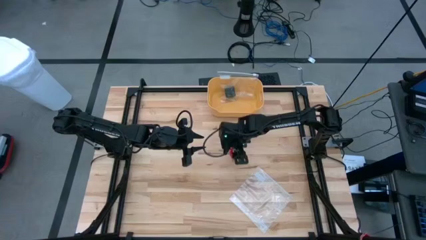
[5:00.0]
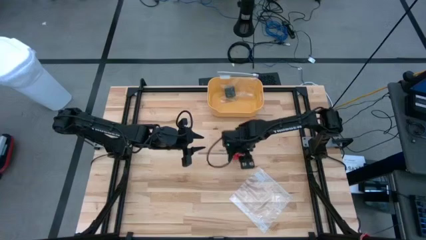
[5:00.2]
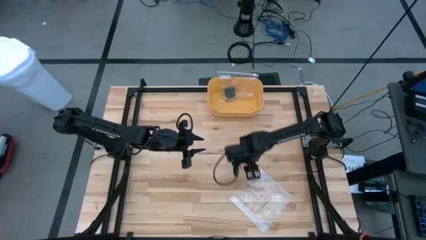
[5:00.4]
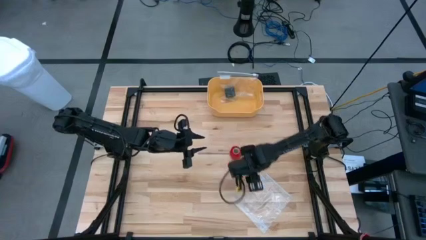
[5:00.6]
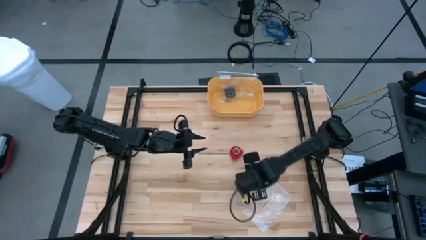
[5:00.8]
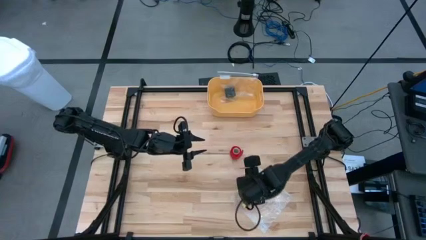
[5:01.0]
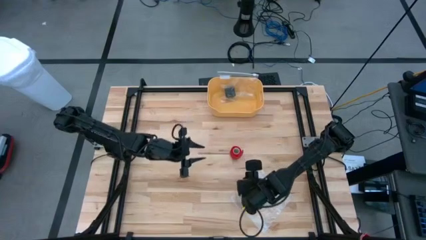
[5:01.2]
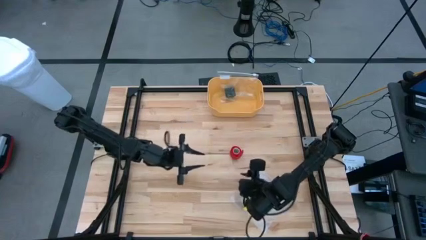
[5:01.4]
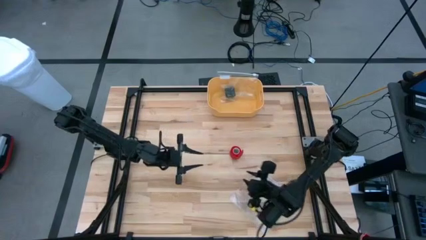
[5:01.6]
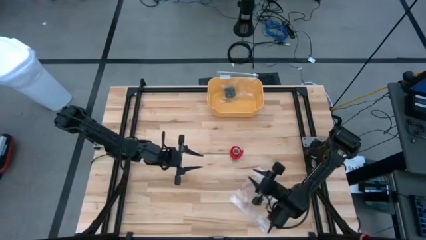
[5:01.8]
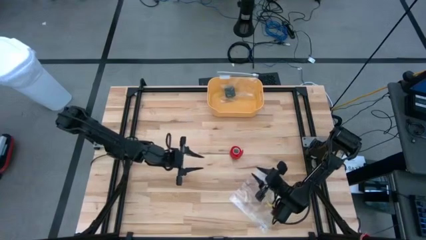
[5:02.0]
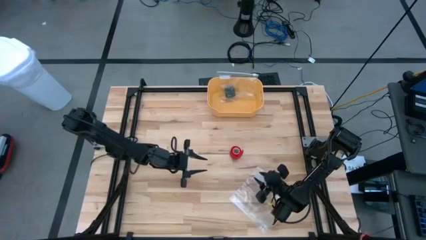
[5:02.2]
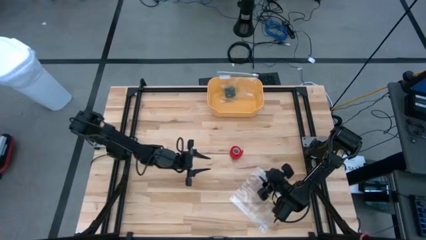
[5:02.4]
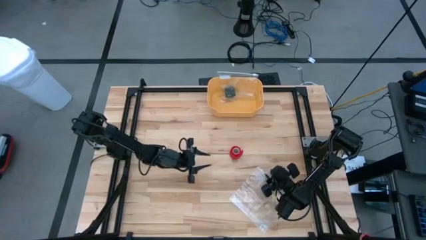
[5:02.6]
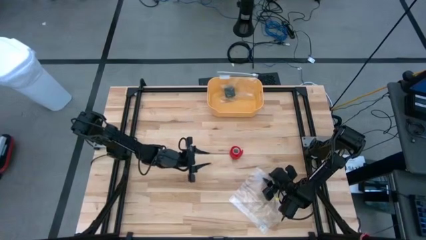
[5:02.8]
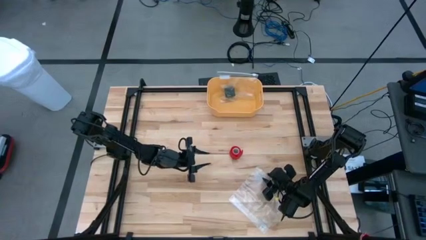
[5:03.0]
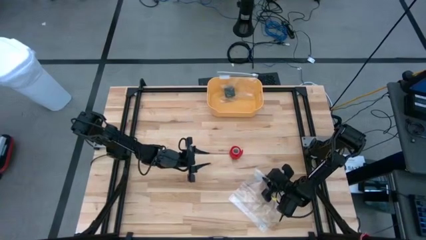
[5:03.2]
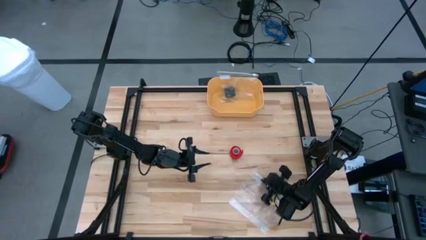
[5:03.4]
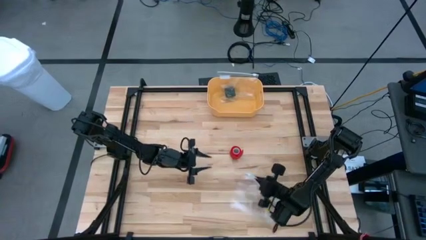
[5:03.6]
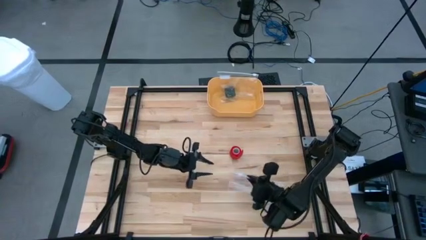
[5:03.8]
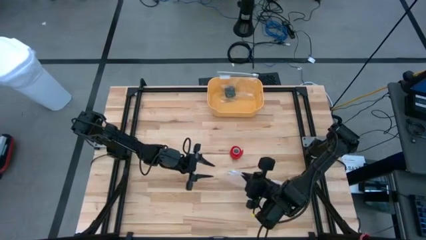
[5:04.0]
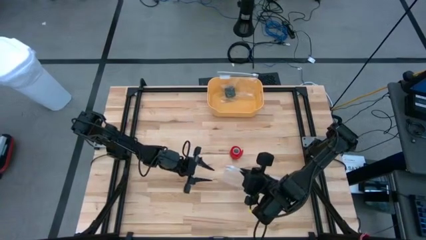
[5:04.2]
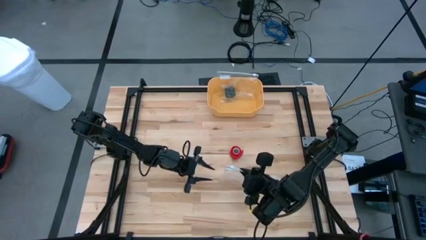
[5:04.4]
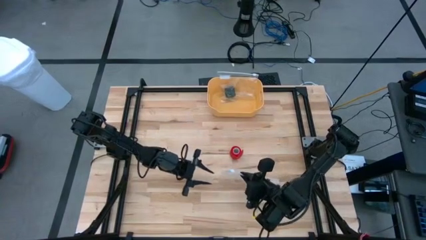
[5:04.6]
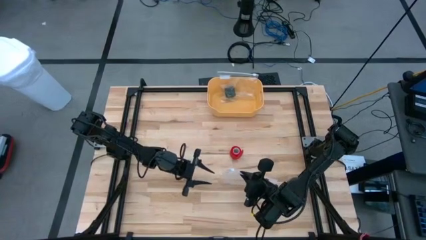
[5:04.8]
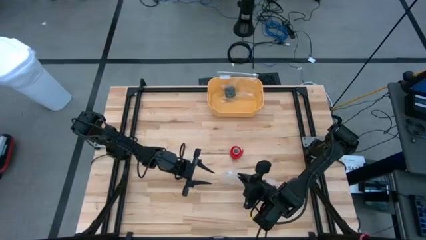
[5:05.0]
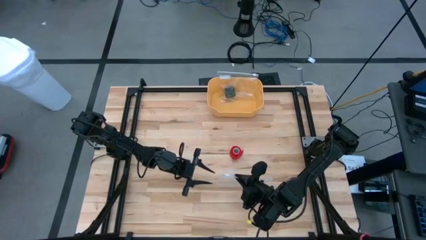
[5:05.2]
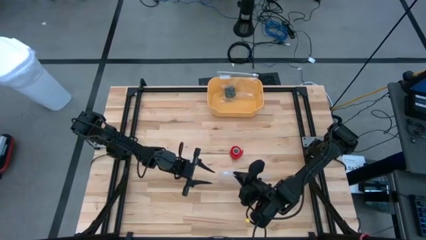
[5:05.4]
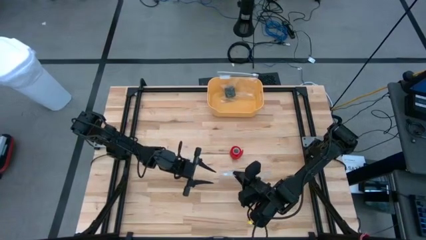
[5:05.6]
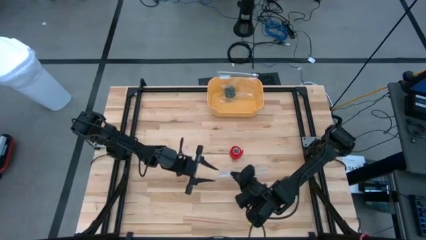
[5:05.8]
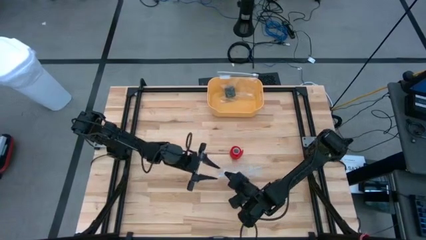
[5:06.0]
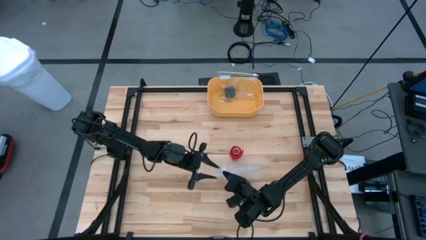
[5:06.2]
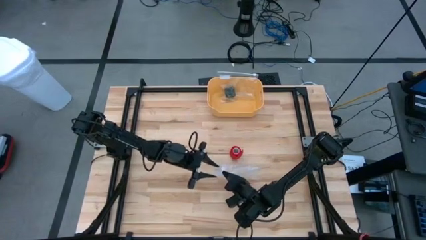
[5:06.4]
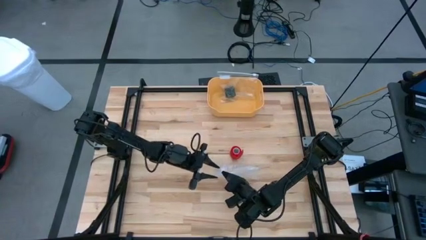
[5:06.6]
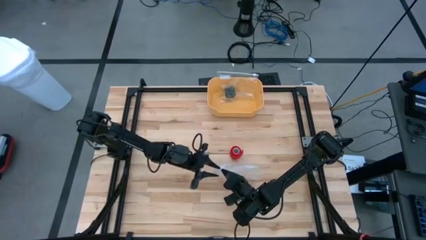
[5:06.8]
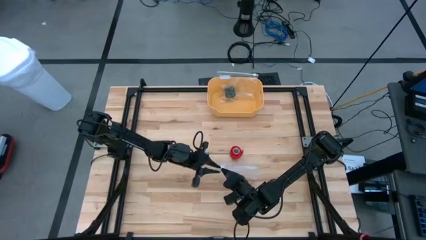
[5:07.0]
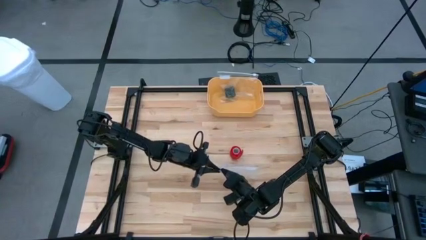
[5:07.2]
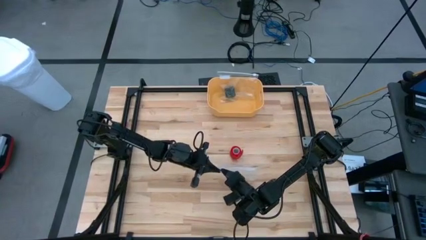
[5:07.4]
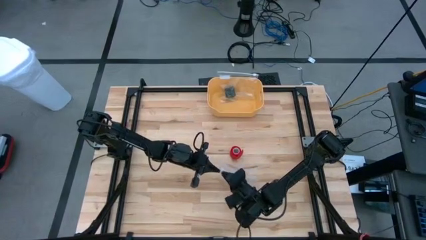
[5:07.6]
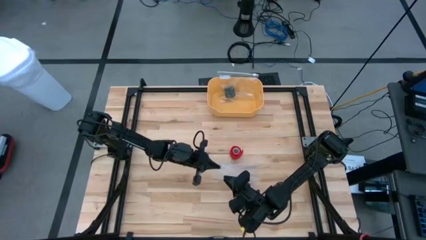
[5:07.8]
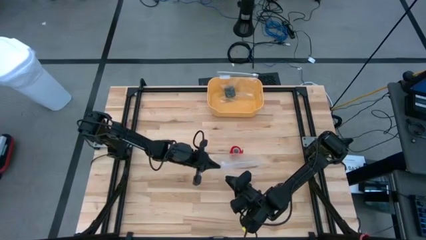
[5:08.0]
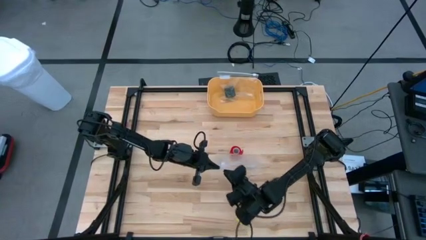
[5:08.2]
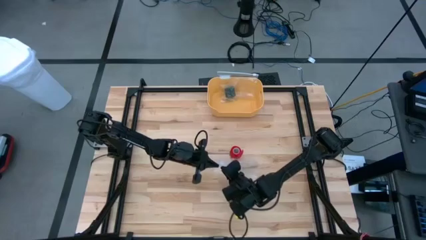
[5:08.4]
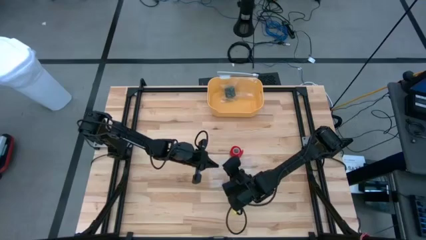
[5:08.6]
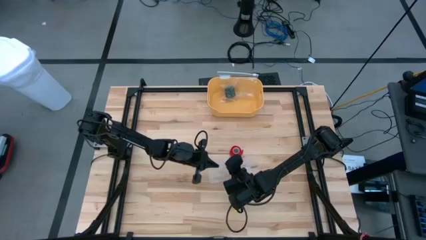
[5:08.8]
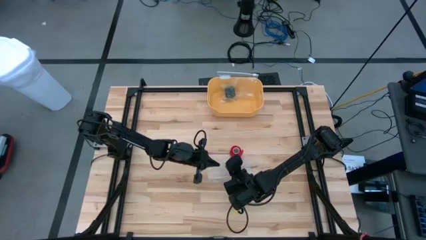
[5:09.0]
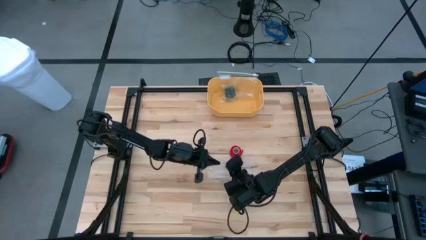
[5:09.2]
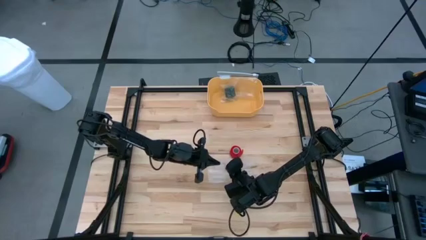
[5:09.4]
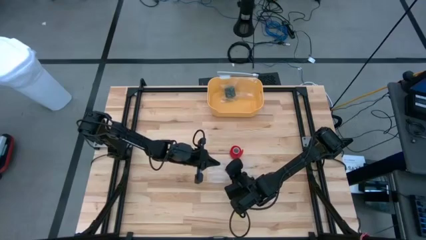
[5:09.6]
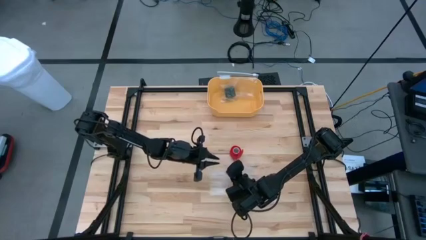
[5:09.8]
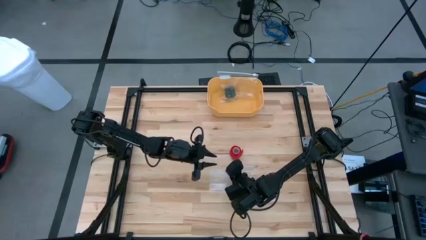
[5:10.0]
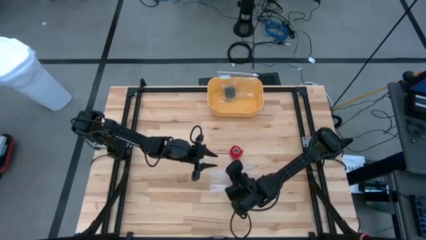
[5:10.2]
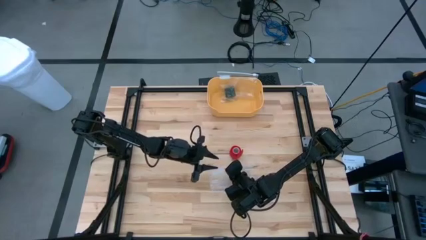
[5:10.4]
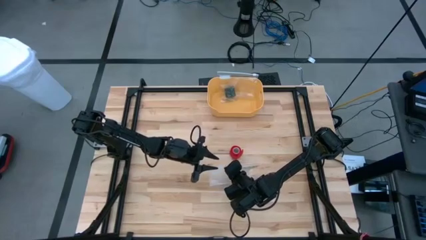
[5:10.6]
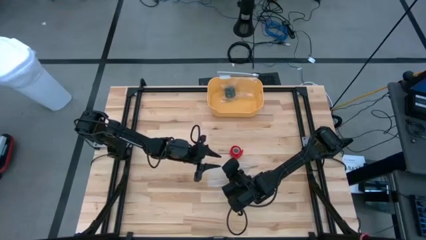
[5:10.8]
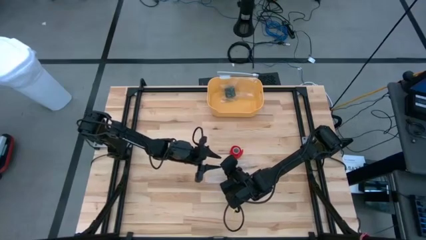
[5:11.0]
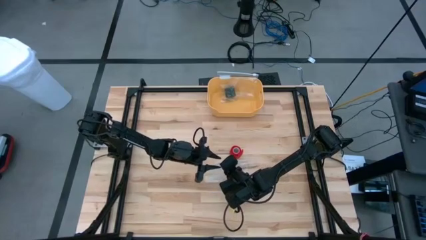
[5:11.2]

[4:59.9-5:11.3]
Task: Roll bandage
Put the rolled red bandage into the transparent zip bag
